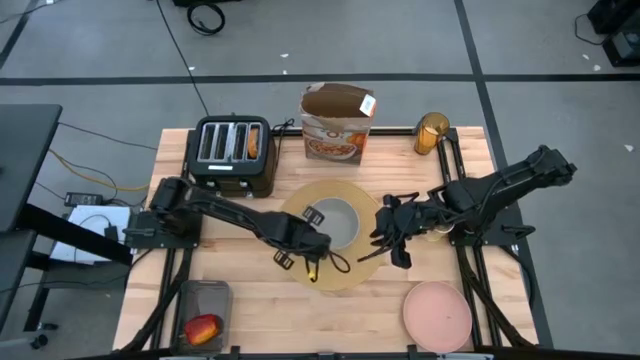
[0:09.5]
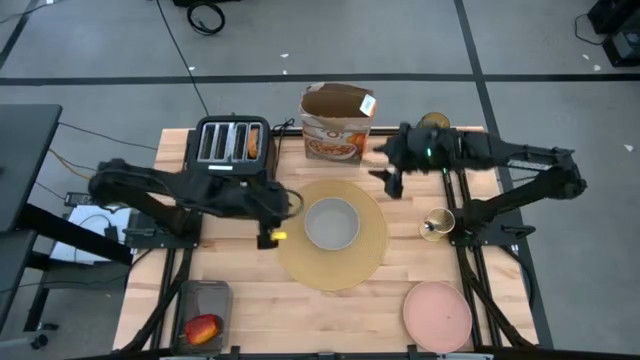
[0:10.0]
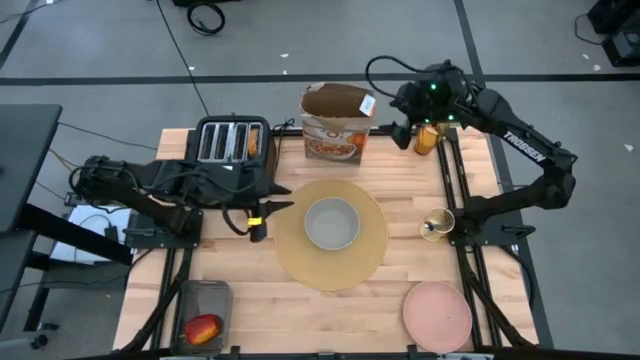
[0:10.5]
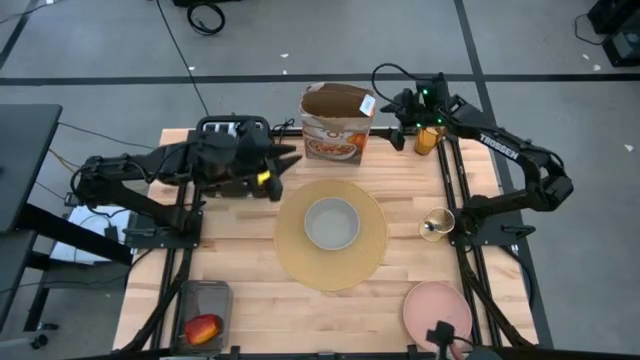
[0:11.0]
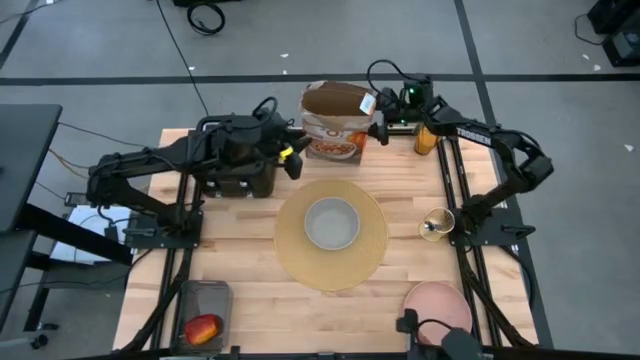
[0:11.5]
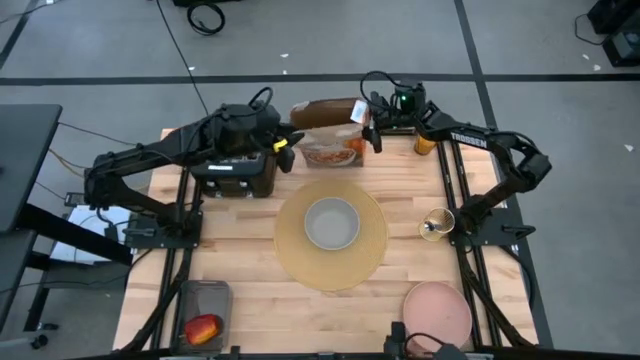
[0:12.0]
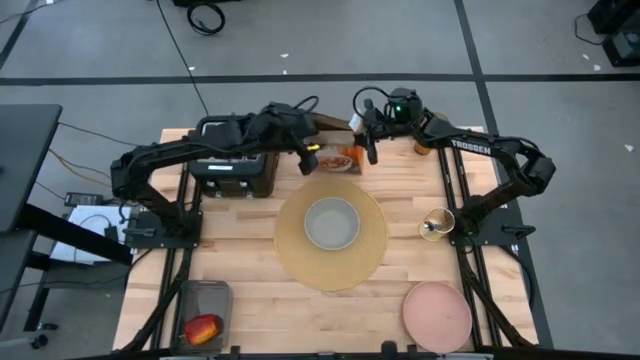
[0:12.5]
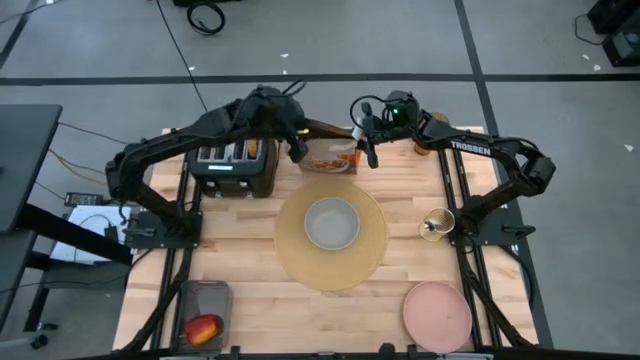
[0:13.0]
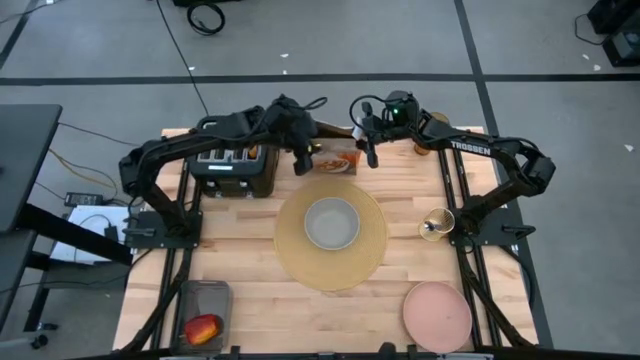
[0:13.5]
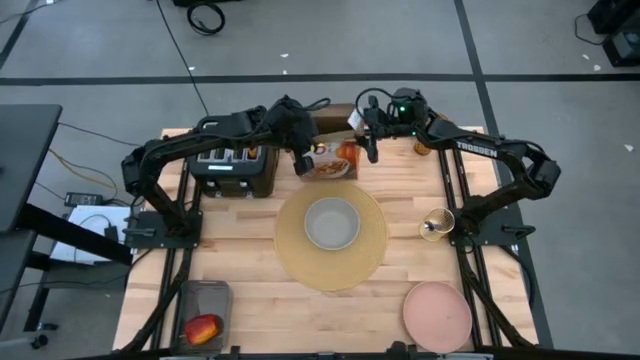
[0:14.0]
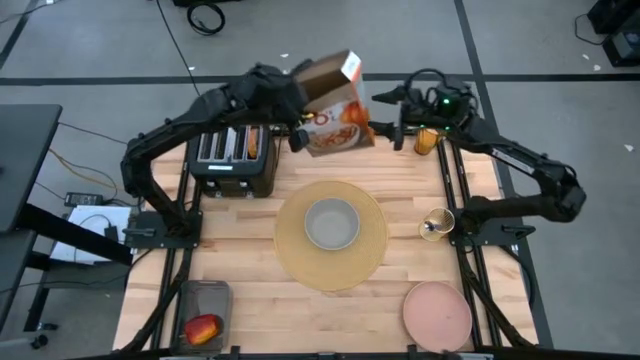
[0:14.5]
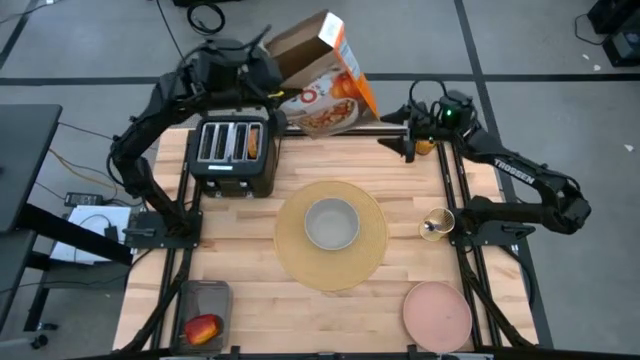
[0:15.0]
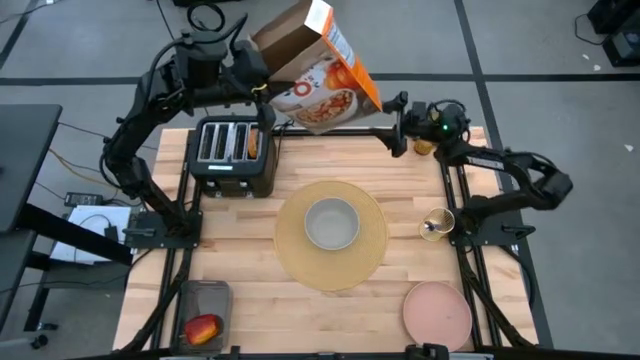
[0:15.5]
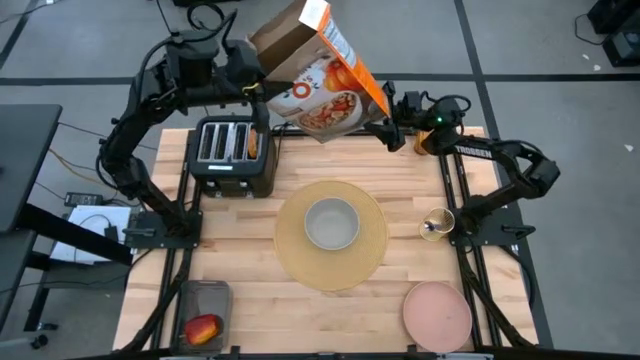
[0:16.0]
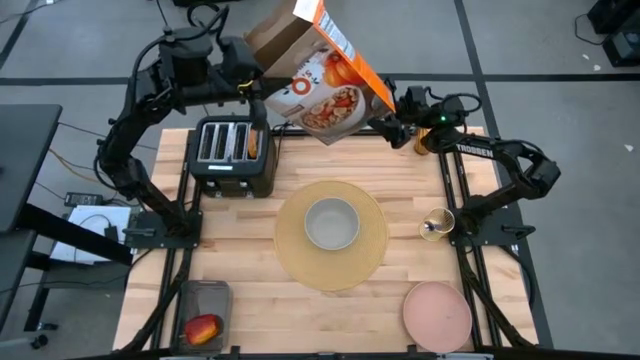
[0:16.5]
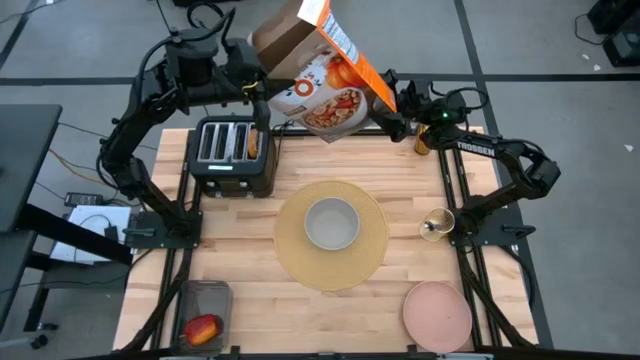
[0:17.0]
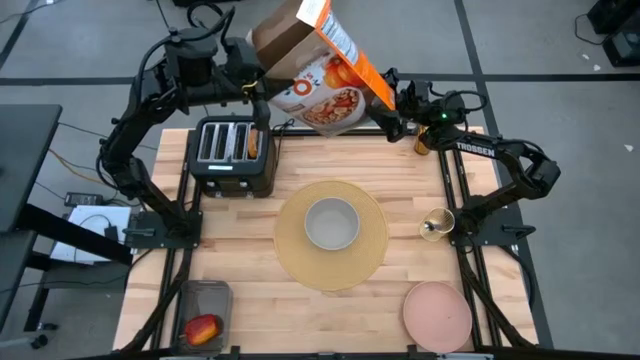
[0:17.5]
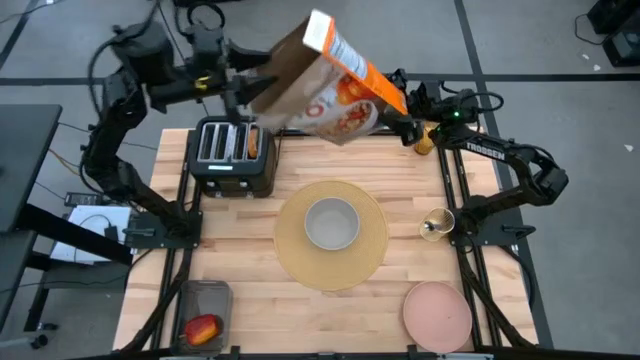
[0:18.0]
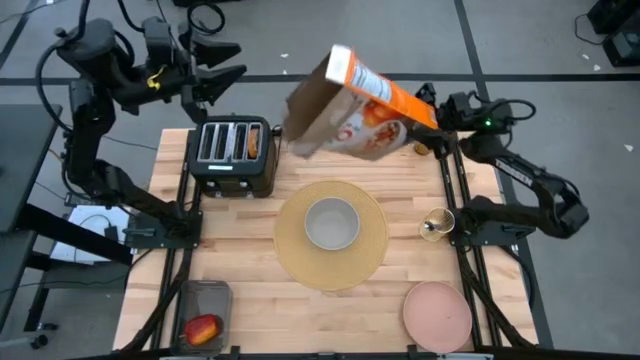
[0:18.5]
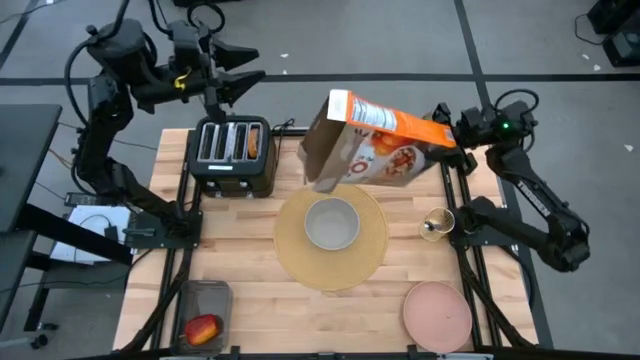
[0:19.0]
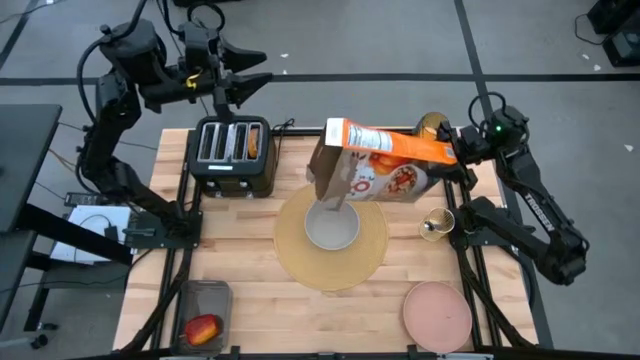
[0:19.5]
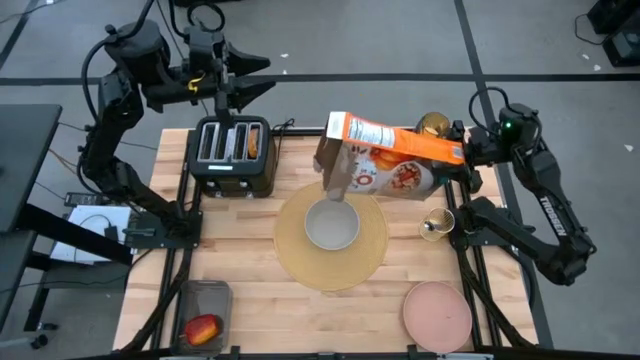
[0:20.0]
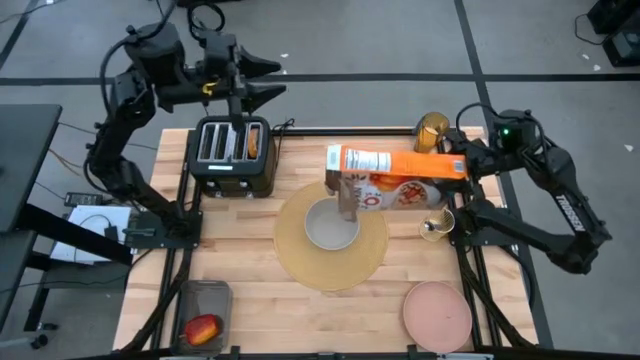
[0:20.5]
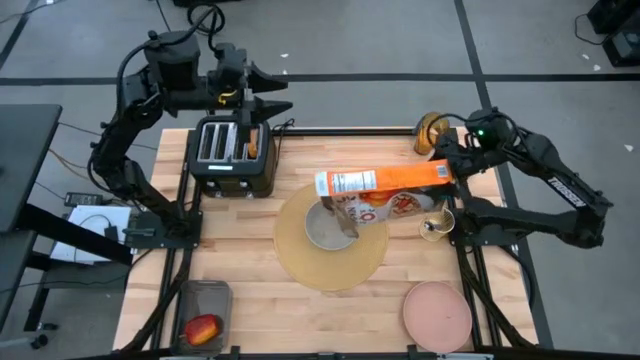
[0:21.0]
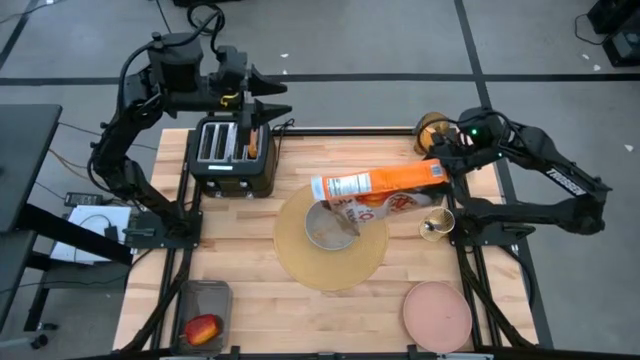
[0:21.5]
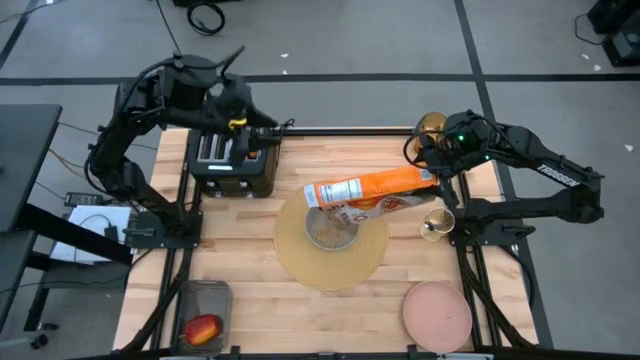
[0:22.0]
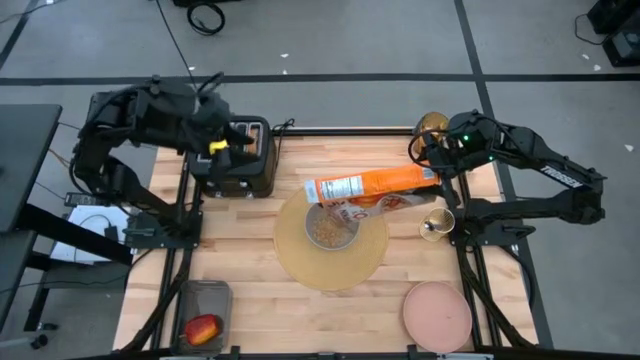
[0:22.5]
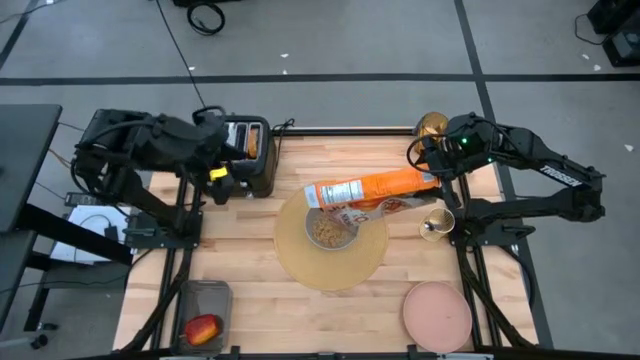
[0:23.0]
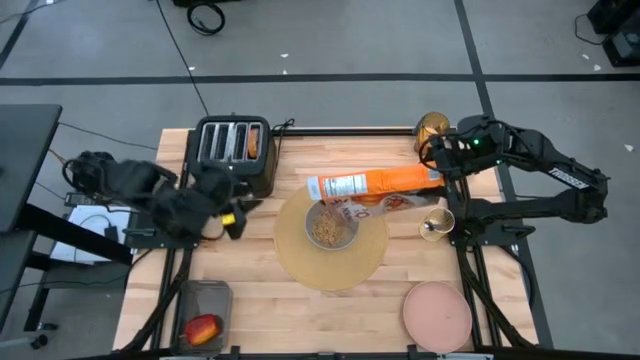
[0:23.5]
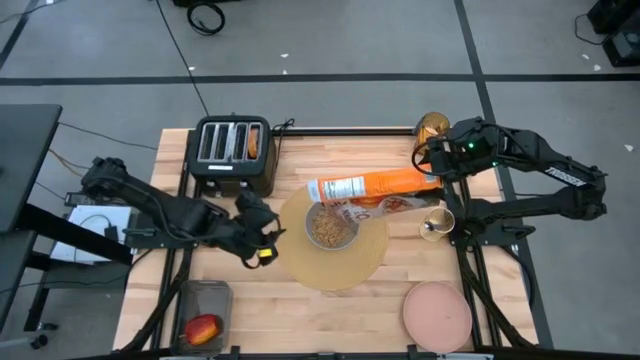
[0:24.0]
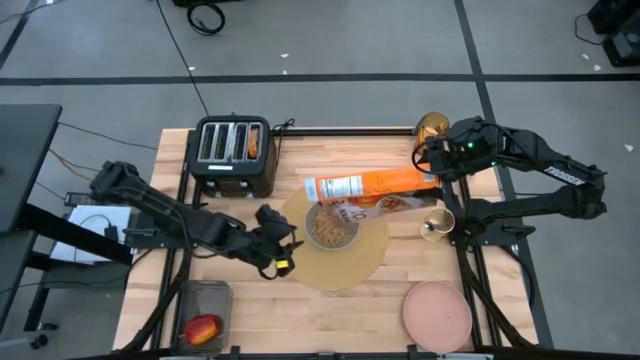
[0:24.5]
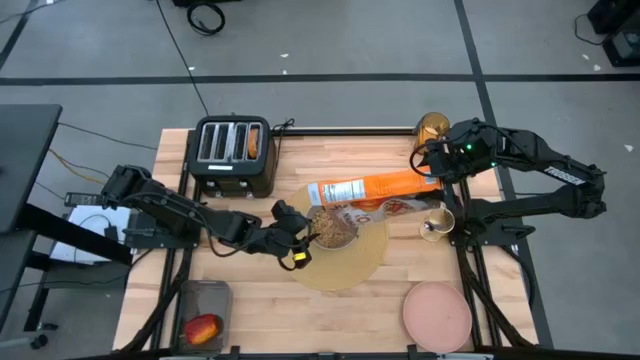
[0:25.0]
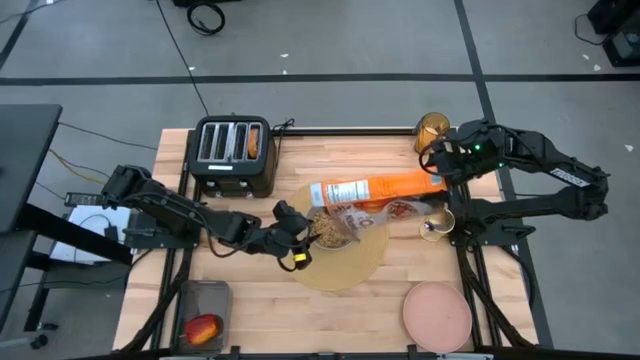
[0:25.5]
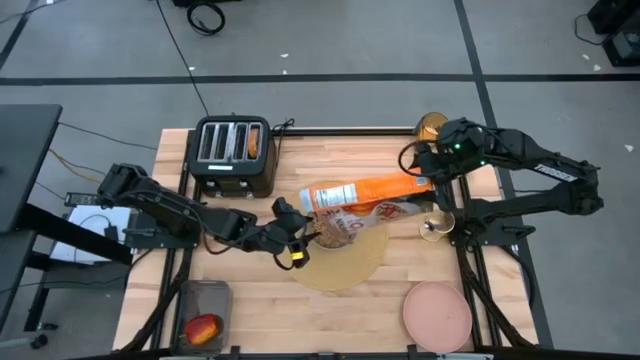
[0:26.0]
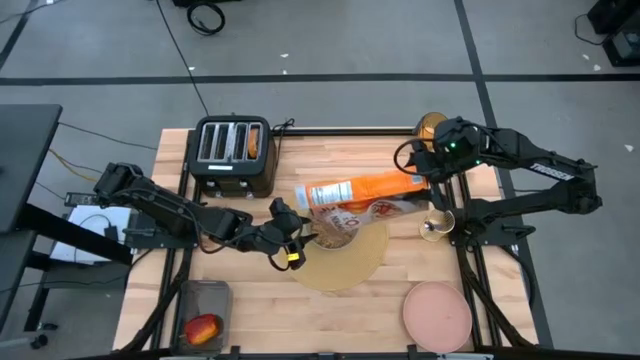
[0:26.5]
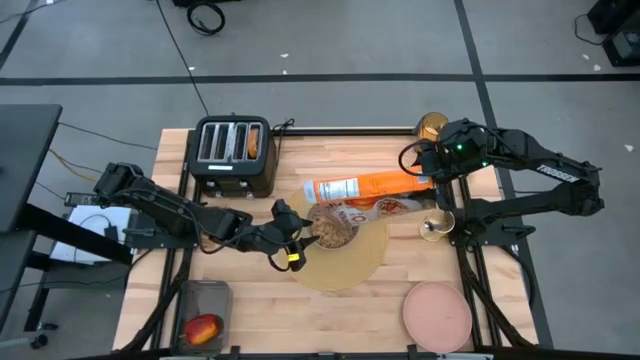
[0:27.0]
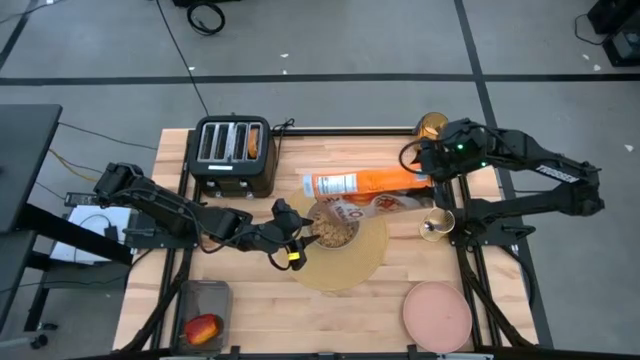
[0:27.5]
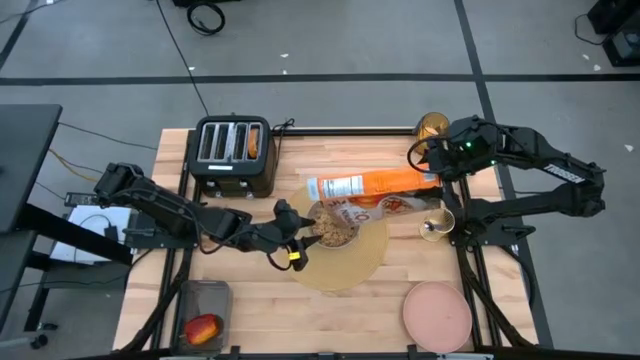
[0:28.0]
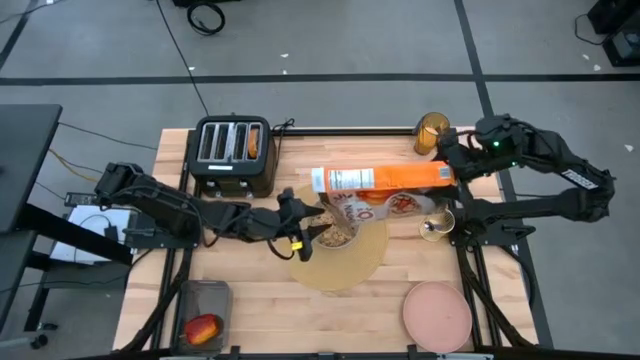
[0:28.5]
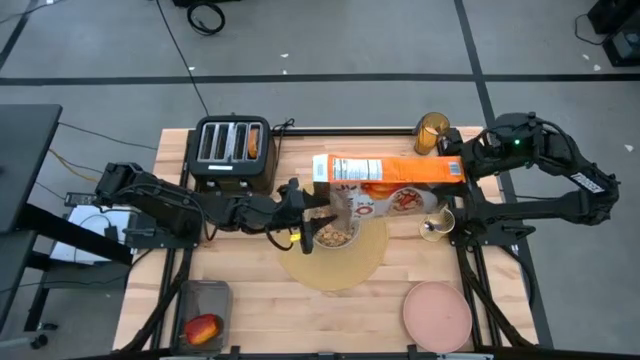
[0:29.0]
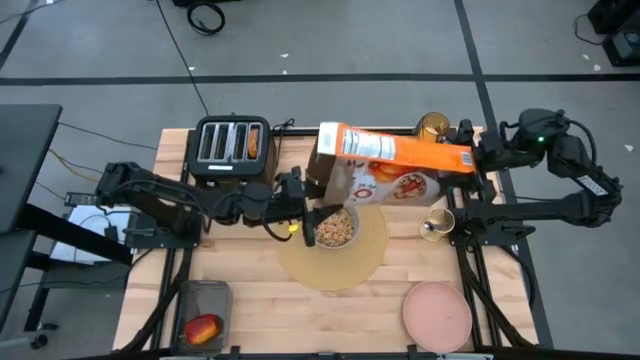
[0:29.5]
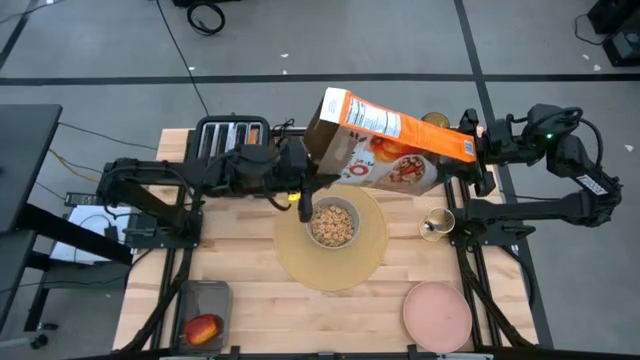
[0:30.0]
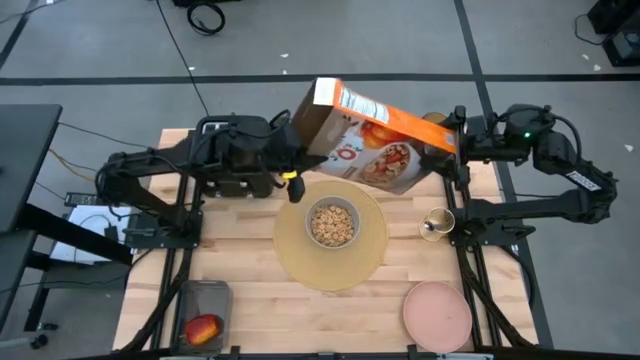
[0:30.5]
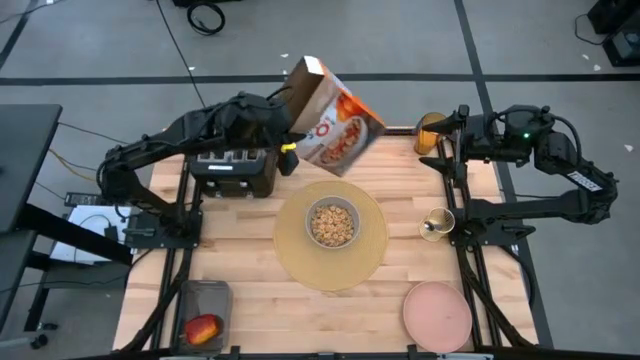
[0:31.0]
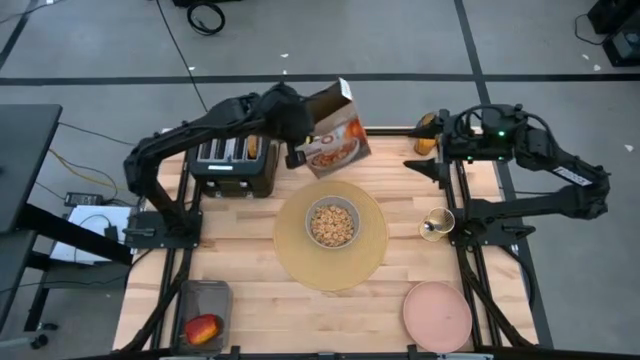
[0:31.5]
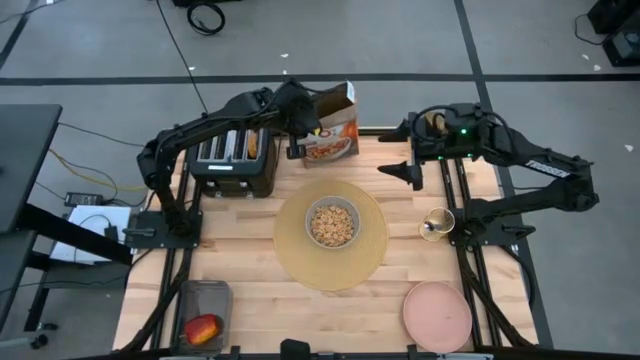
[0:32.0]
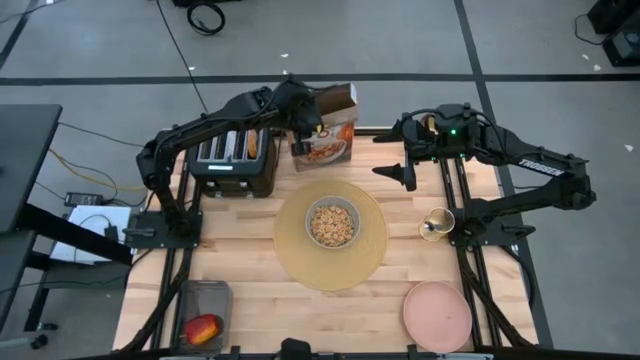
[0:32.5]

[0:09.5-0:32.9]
Task: Arrange a breakfast setting
Pour the cereal into the gray bowl
